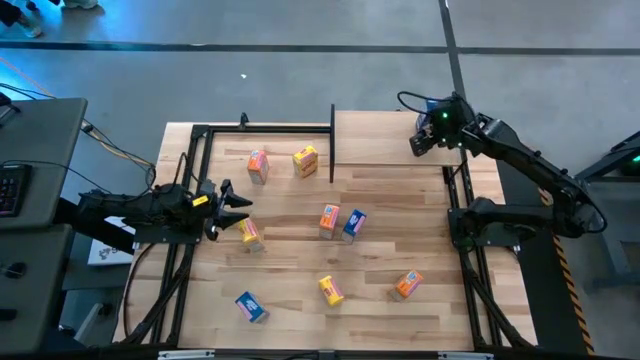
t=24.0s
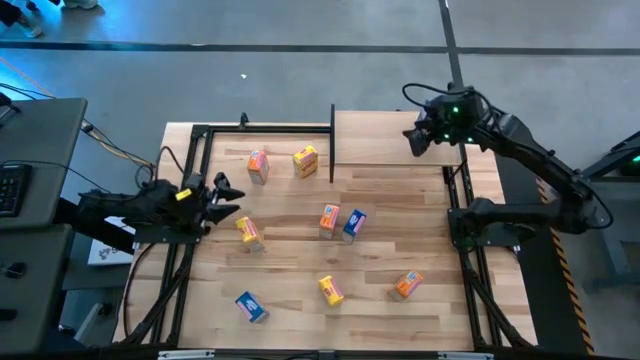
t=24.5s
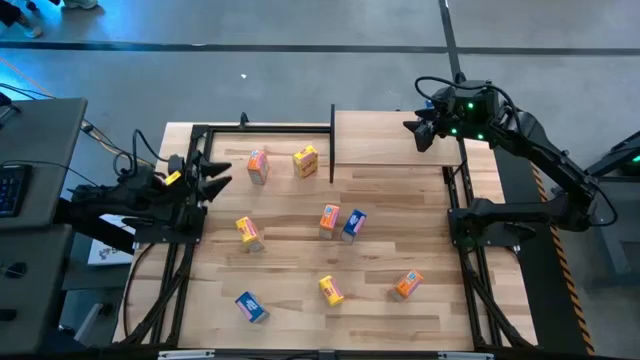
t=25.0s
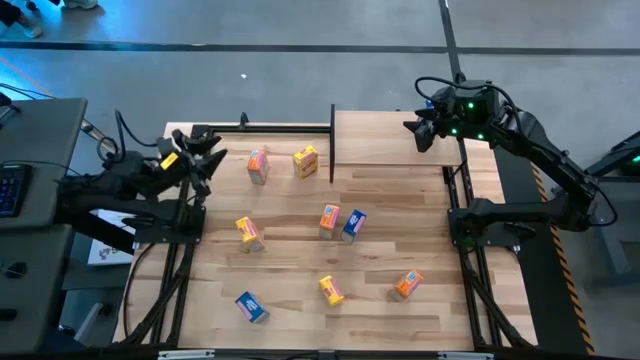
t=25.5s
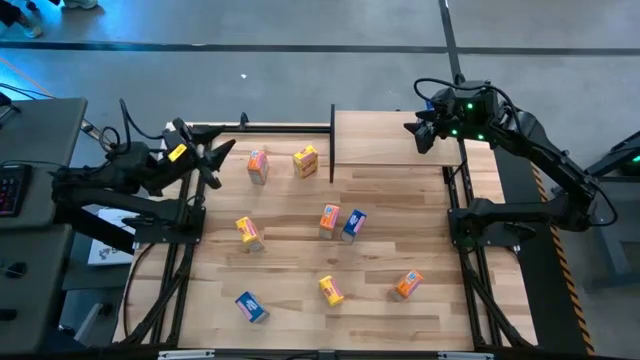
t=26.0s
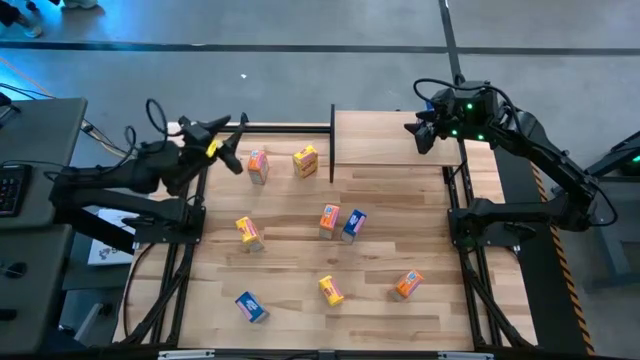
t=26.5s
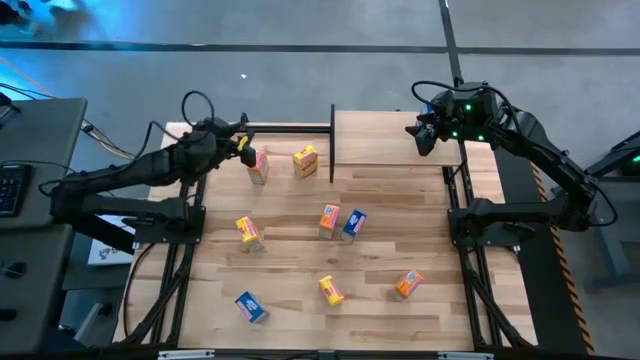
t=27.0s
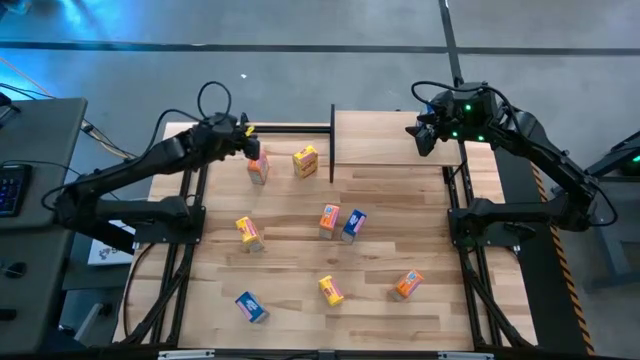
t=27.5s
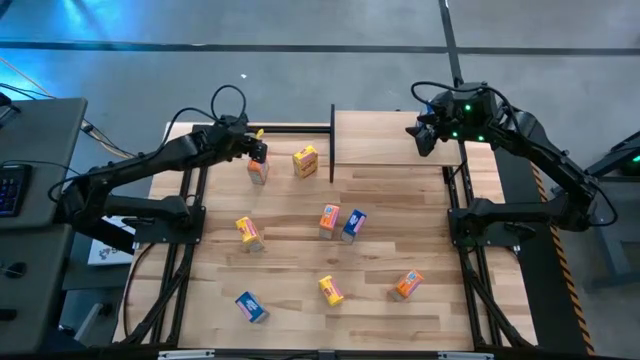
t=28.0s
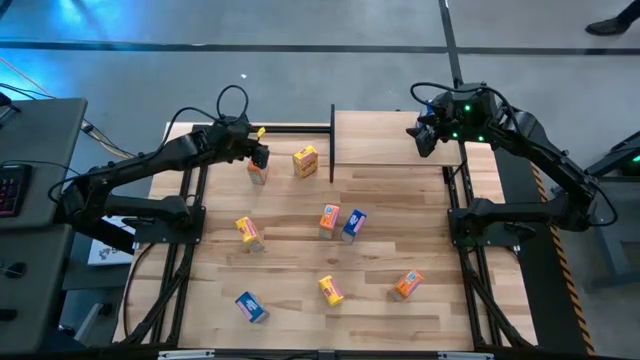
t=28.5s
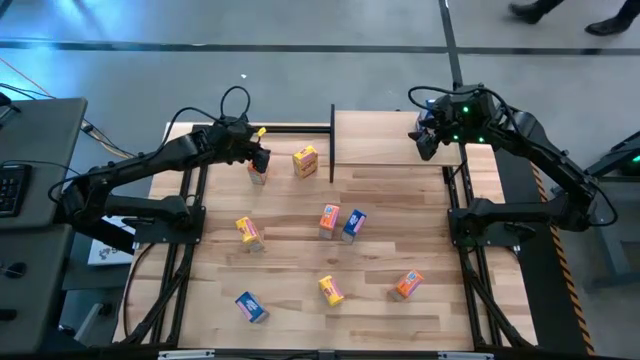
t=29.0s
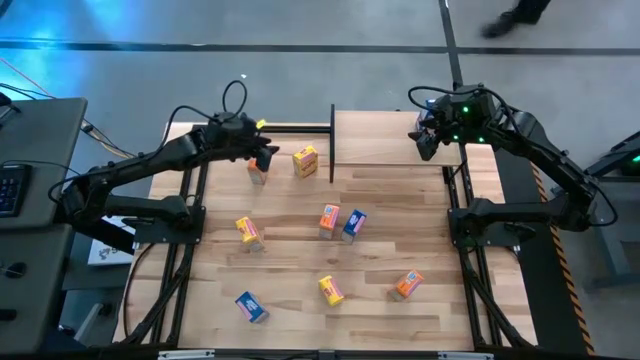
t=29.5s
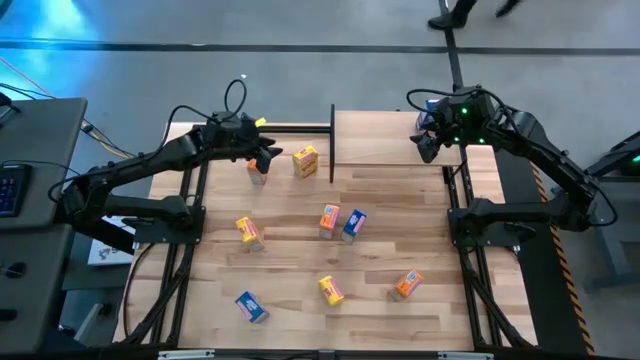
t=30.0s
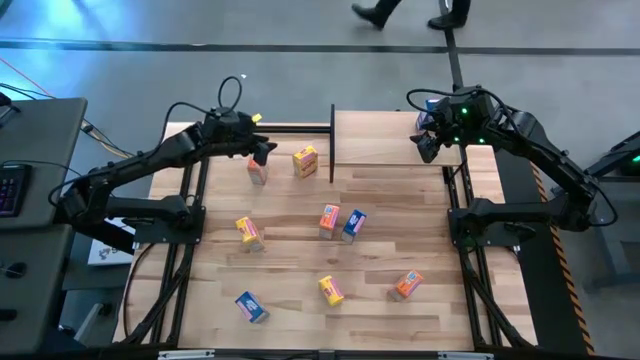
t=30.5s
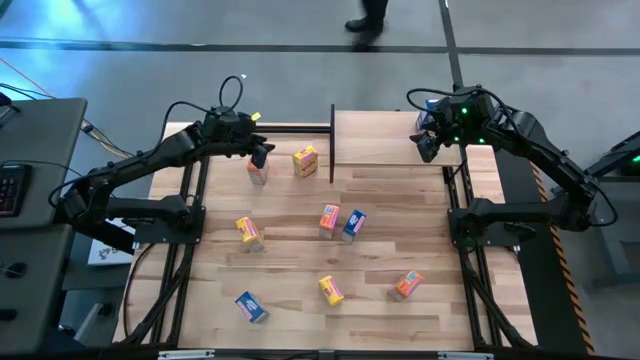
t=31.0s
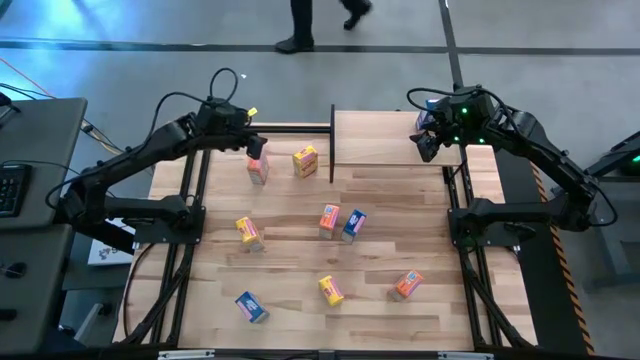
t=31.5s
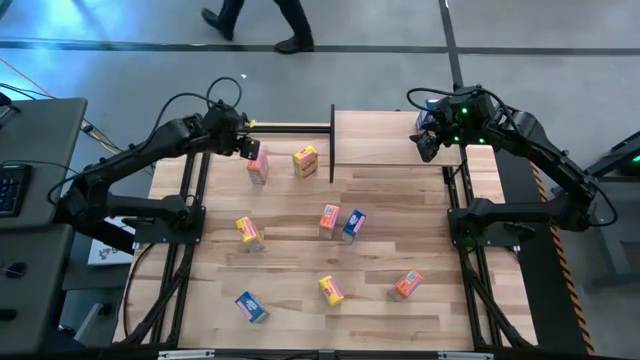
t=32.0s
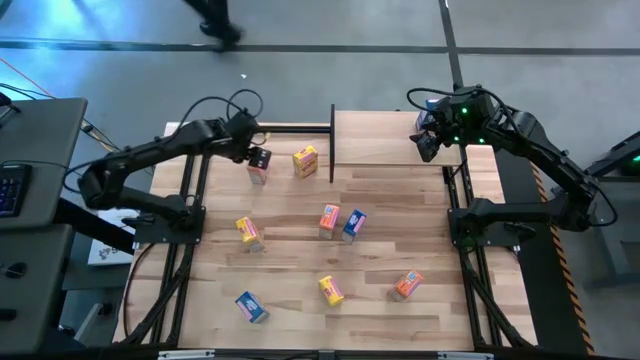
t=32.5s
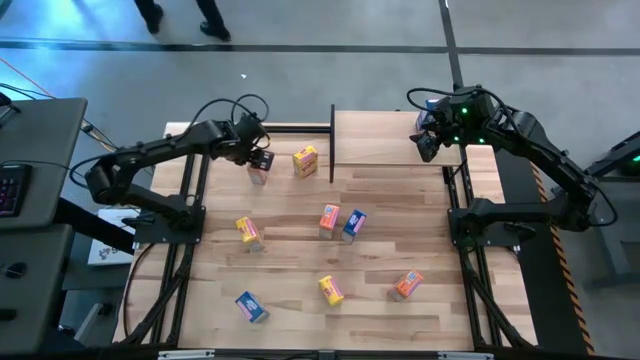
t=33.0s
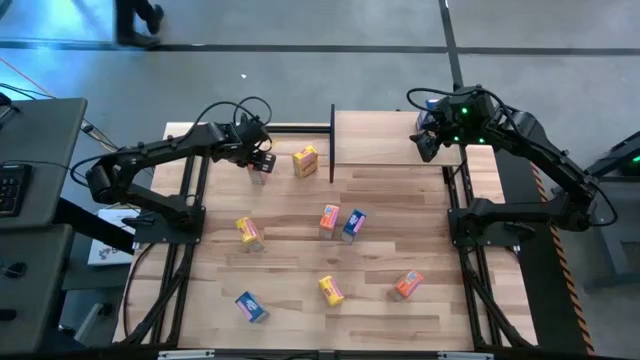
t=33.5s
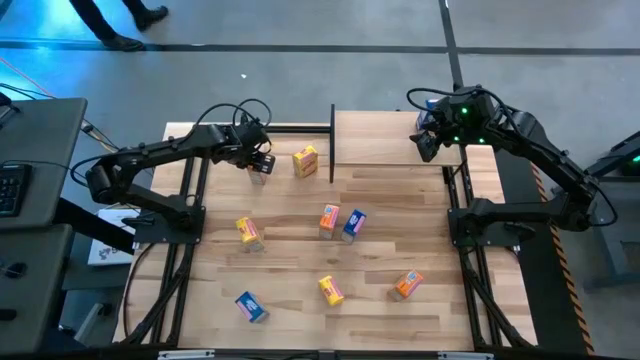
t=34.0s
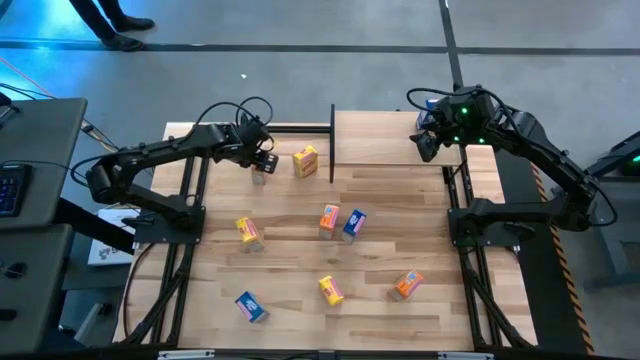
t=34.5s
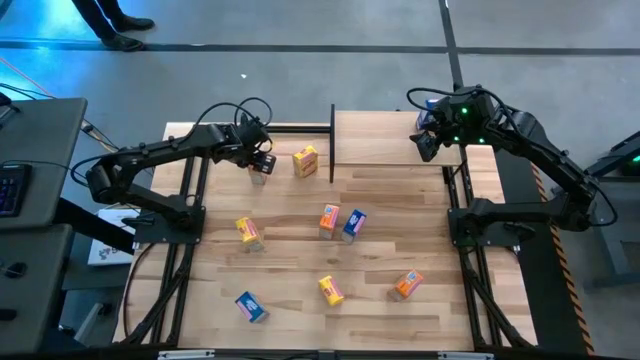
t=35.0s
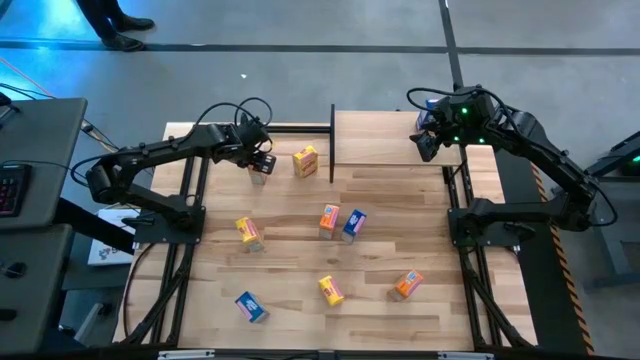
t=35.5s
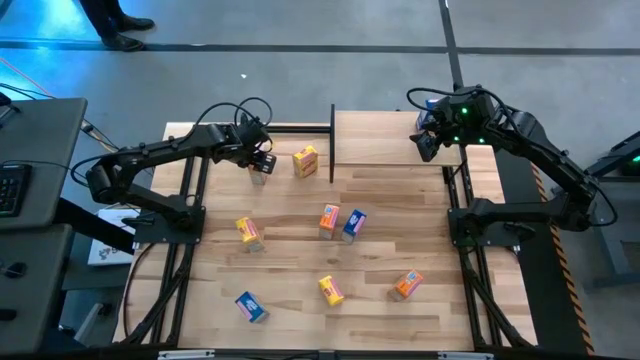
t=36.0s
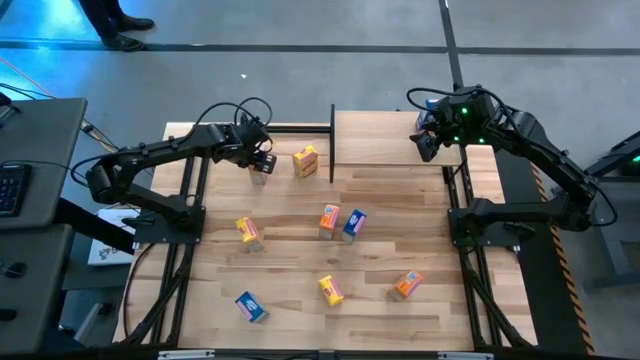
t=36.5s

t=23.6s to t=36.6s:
Task: Stack cereal on shelf
Put the top orange cereal box on the shelf
